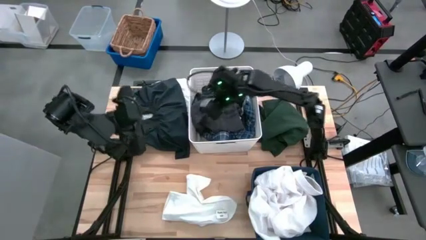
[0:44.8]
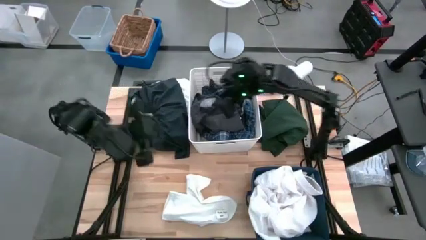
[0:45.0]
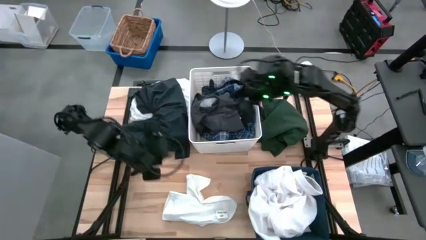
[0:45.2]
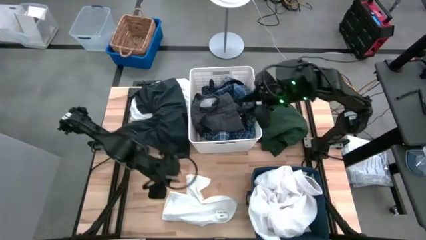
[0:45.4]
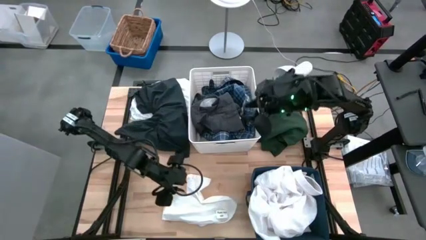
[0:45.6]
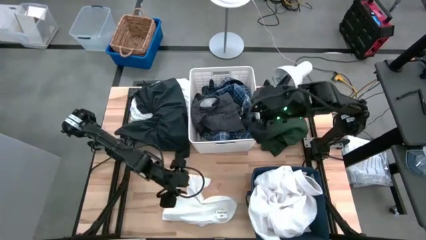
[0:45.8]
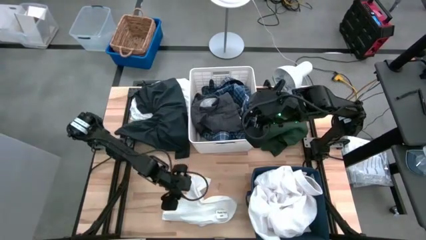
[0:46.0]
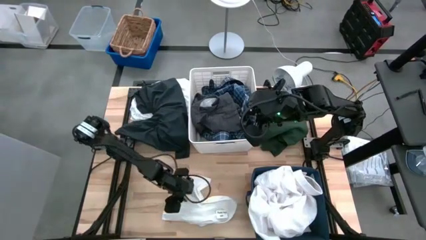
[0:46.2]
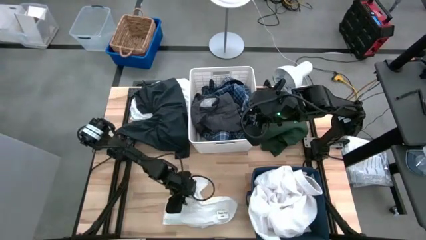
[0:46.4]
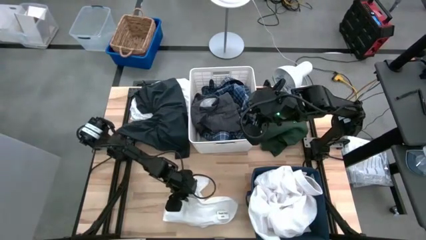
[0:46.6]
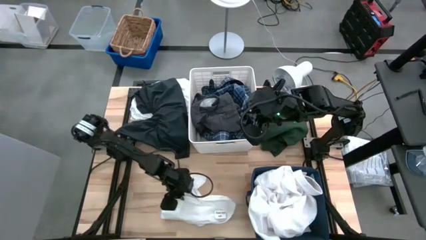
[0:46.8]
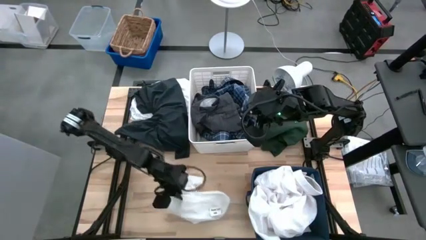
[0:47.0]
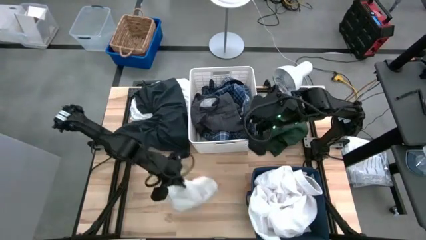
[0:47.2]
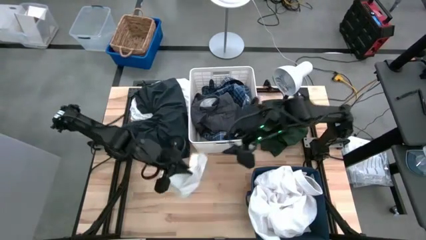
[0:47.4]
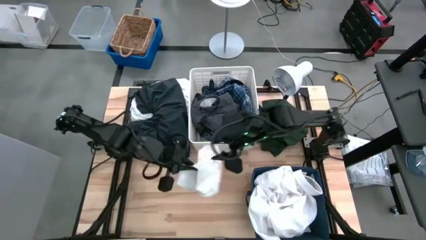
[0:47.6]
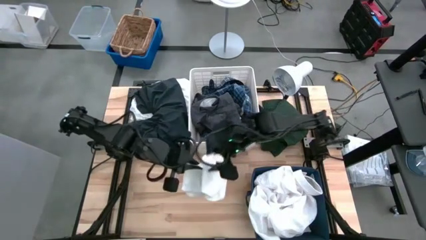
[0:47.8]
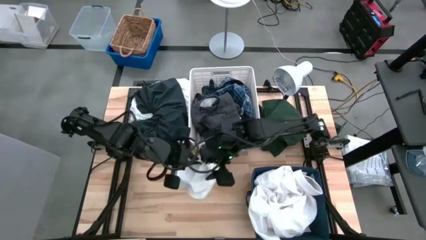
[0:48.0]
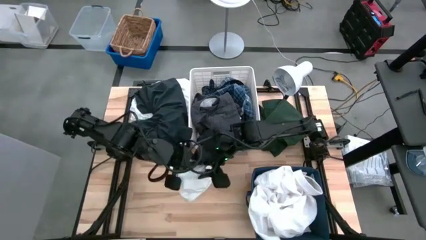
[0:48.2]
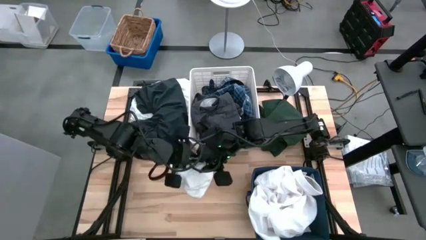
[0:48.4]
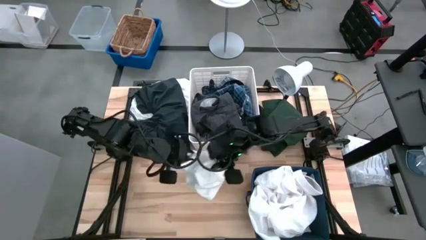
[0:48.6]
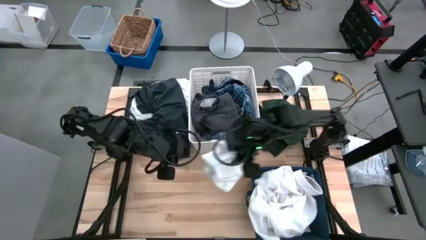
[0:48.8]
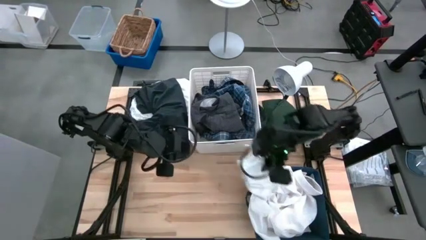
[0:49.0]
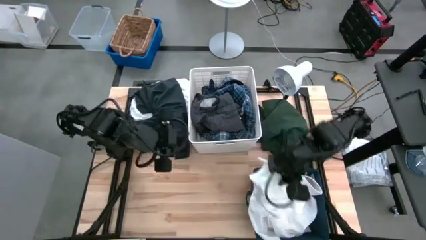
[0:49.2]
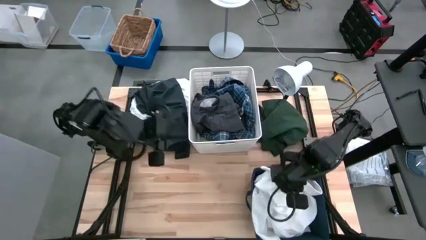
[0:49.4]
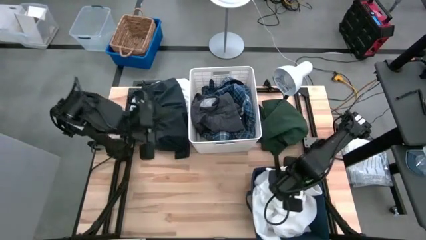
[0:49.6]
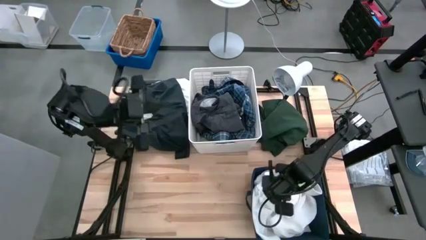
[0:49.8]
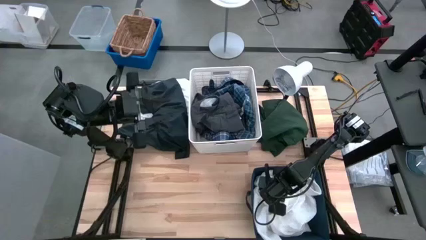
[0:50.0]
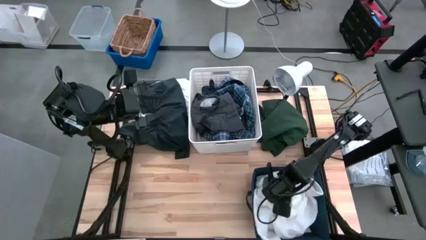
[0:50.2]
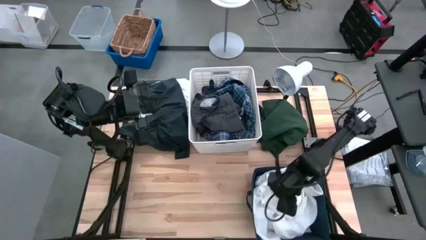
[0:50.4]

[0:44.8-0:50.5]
Task: Sort clothes
Put the white underwear into the blue laundry bin

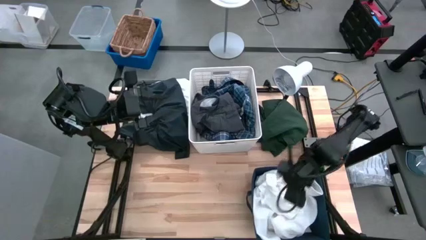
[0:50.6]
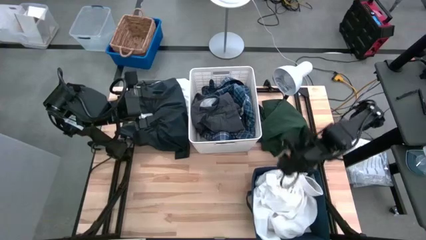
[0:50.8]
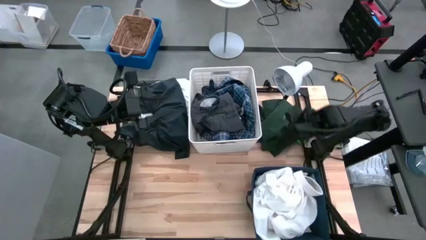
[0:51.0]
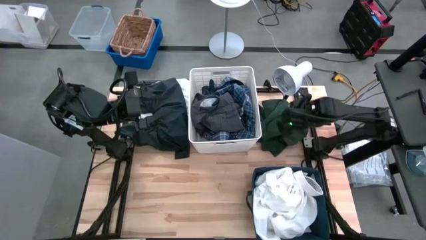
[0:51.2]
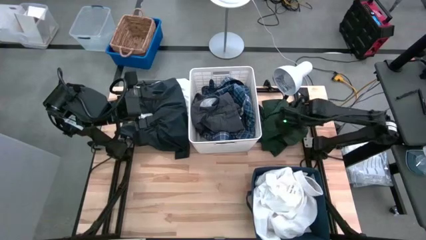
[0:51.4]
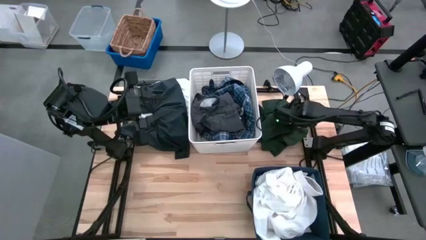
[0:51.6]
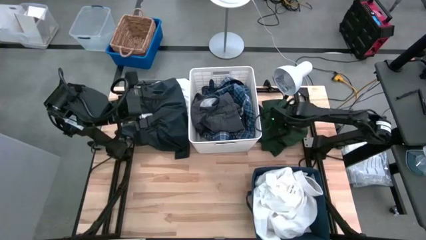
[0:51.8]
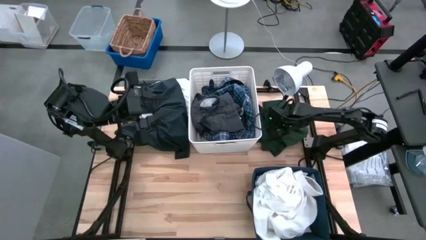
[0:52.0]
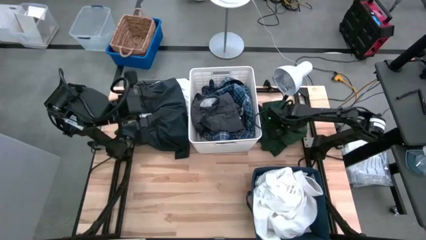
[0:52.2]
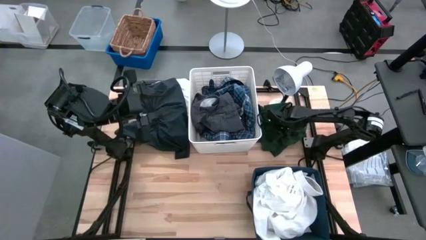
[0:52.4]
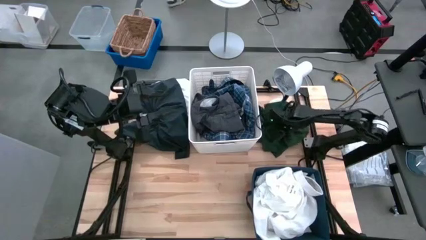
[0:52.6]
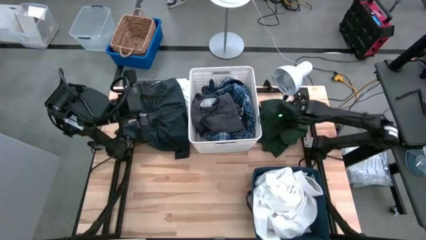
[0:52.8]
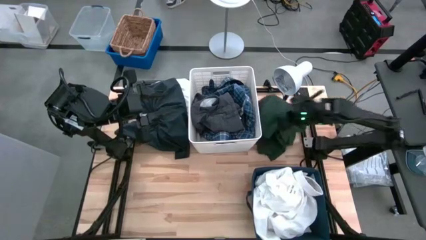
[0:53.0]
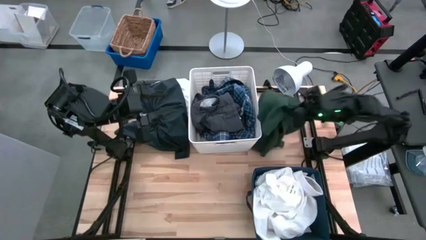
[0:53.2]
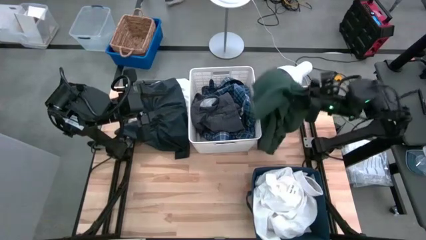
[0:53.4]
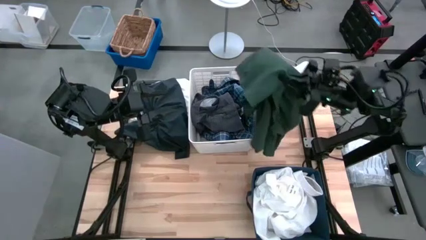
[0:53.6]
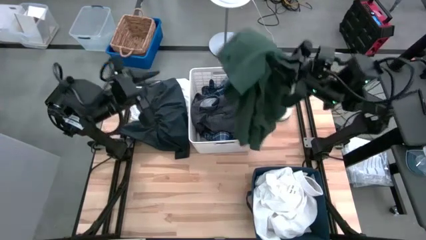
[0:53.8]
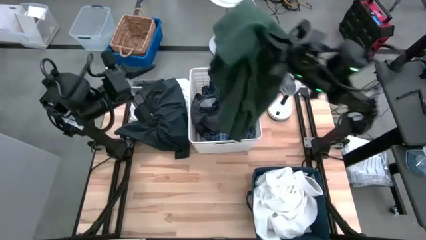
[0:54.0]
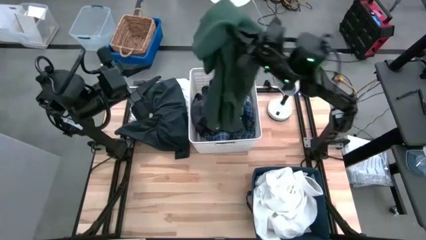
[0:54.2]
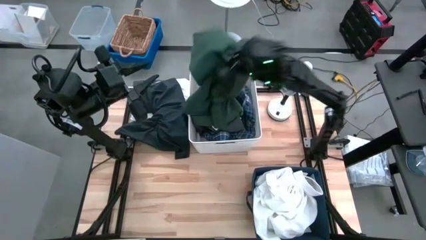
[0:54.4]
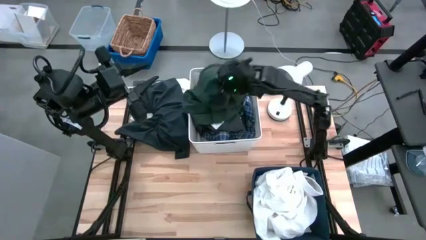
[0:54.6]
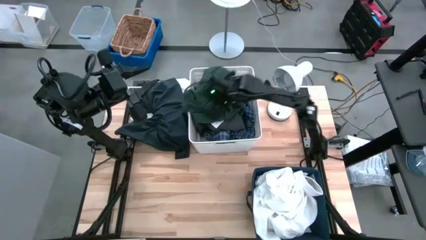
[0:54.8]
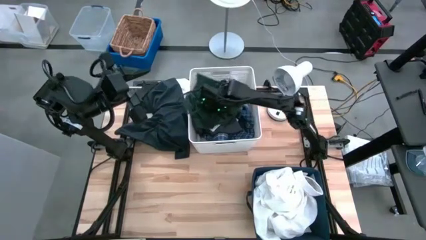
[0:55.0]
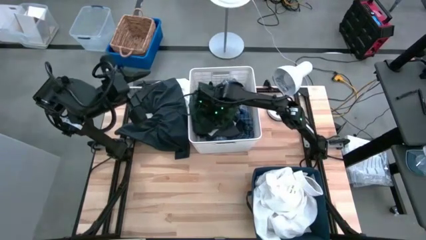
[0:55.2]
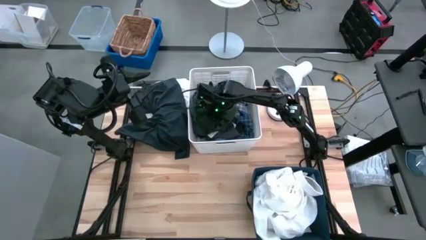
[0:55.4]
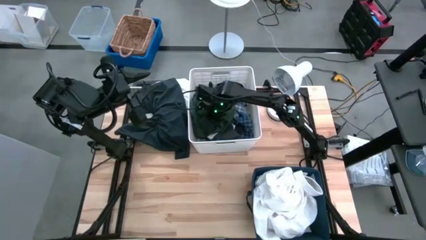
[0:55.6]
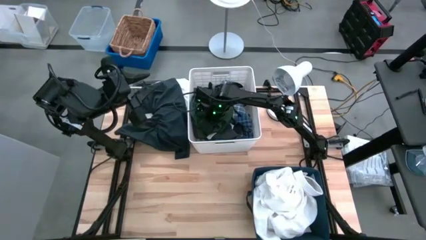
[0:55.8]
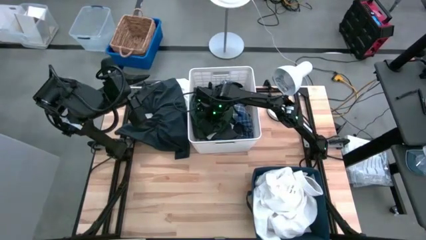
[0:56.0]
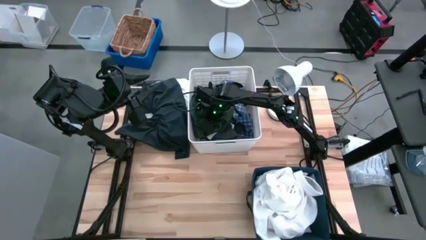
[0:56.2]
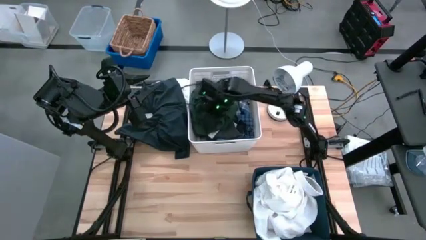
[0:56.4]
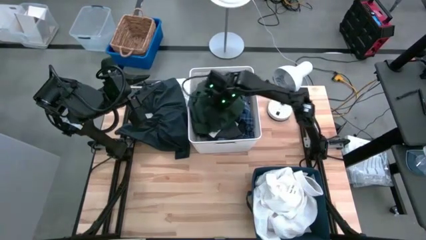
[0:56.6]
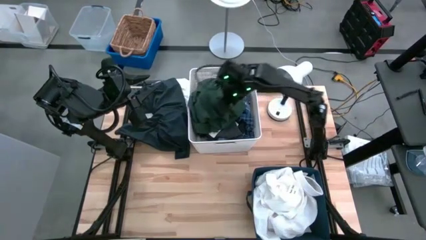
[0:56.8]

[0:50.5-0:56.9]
Put the green polo shirt into the white laundry bin

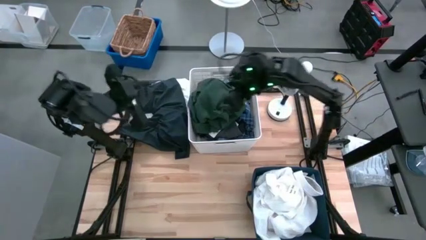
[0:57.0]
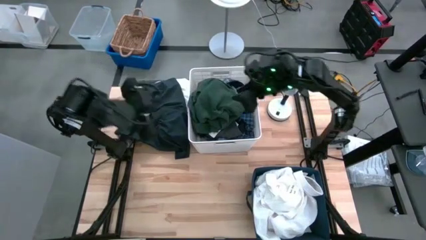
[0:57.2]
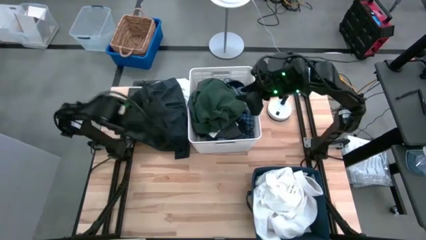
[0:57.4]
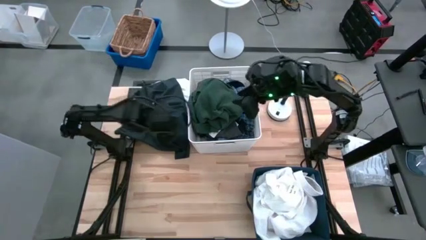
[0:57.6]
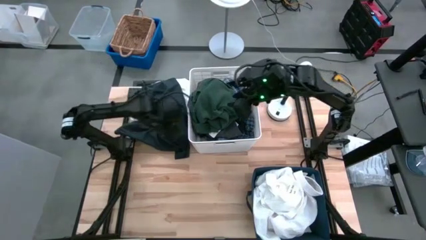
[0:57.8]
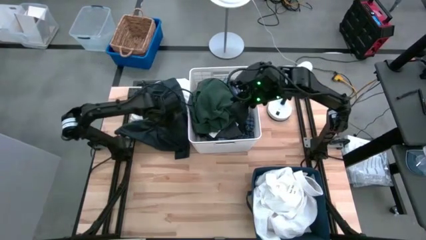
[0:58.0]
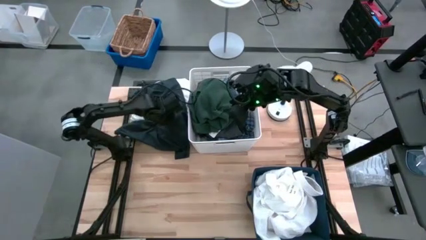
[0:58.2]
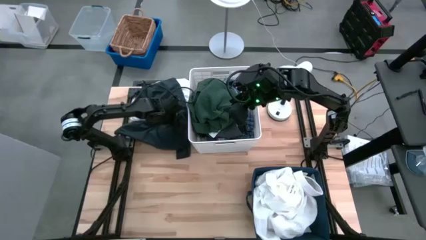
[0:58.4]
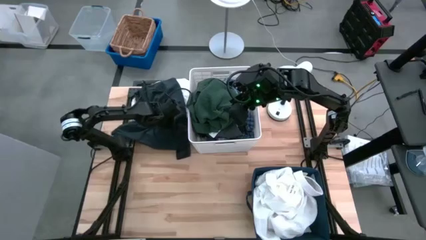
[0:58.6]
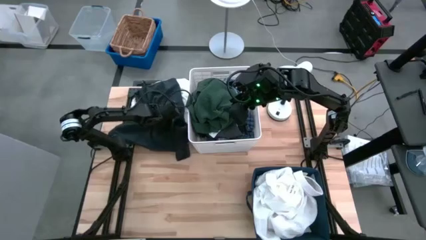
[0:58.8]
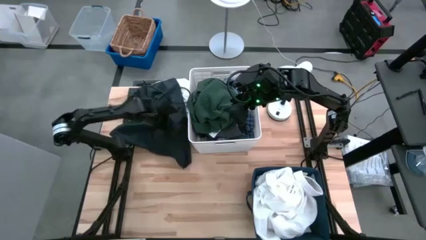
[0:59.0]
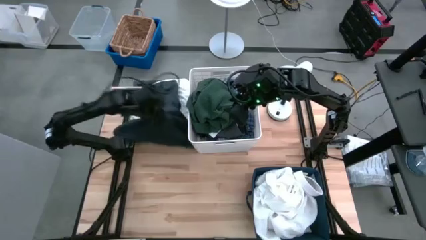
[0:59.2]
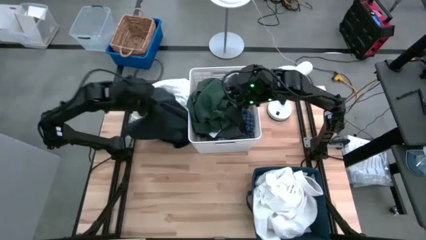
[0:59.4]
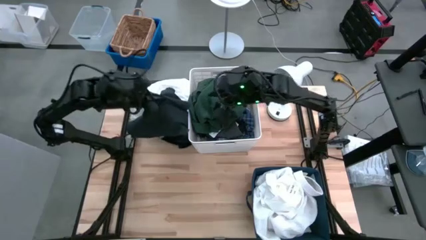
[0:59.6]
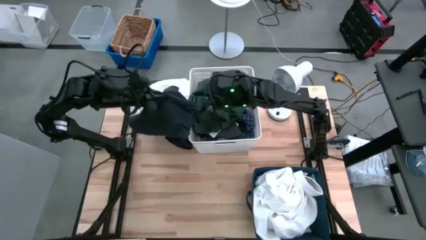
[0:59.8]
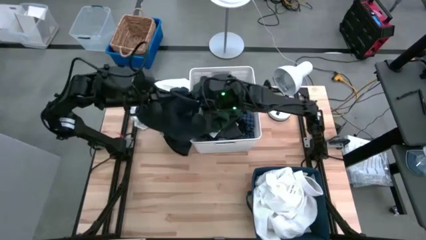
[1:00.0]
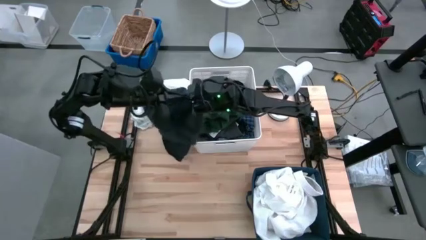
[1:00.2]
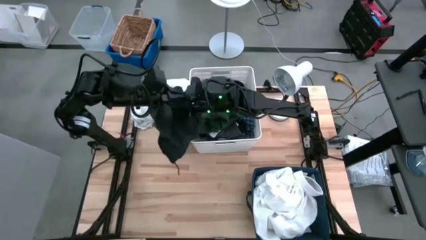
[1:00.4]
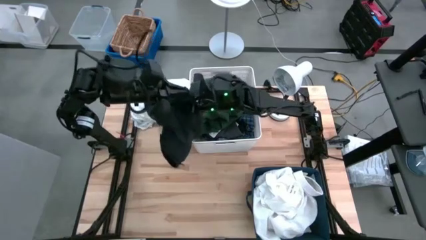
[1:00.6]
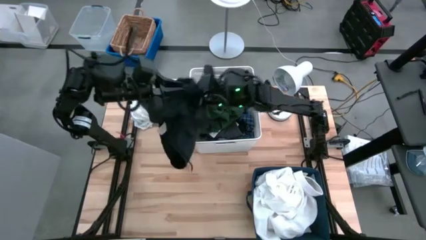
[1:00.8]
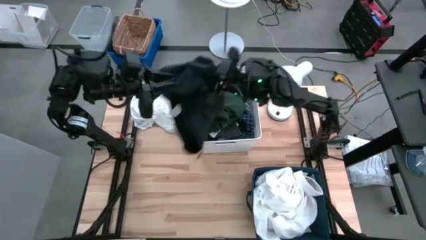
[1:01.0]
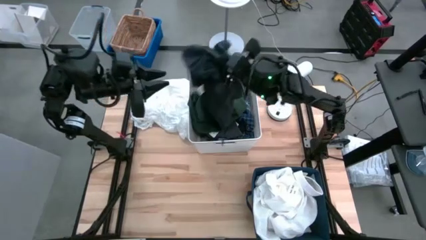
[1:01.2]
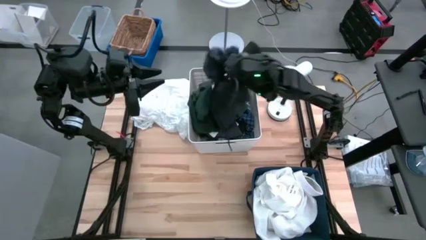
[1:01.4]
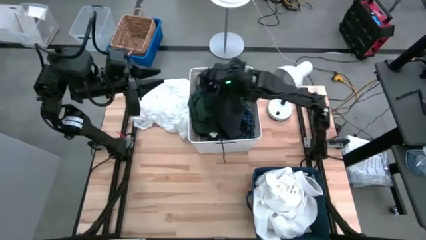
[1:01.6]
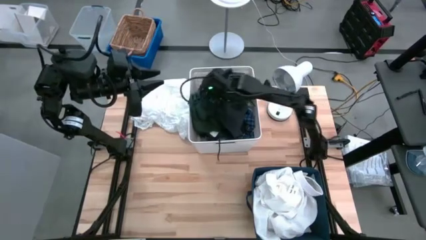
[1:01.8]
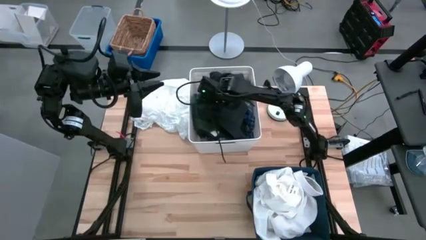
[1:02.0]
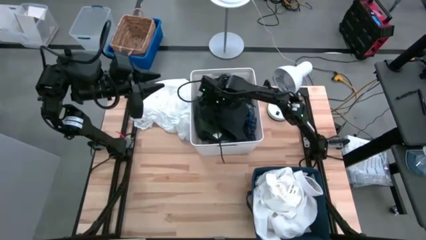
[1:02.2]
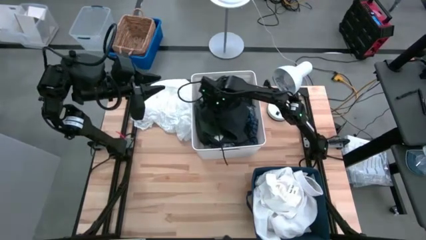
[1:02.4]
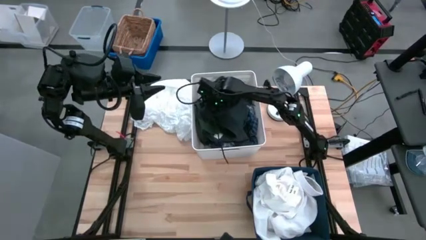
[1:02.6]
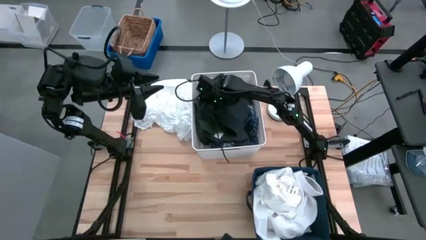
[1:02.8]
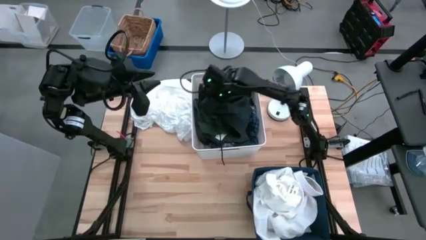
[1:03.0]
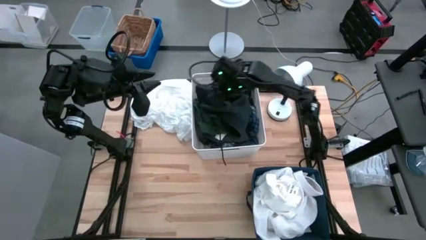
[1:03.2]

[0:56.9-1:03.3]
Put the black shorts into the white laundry bin
